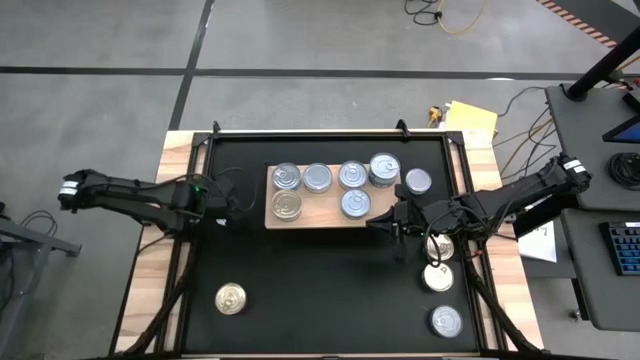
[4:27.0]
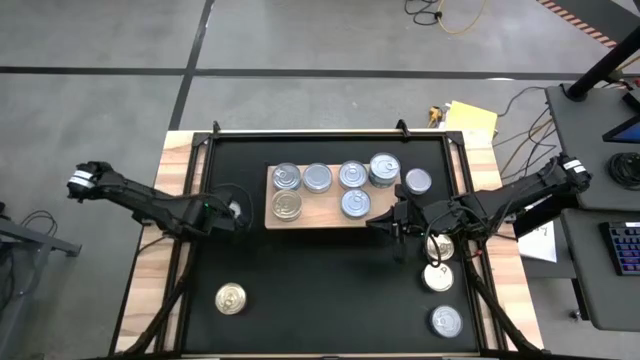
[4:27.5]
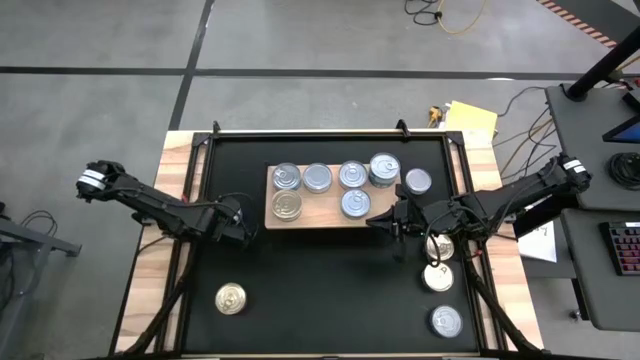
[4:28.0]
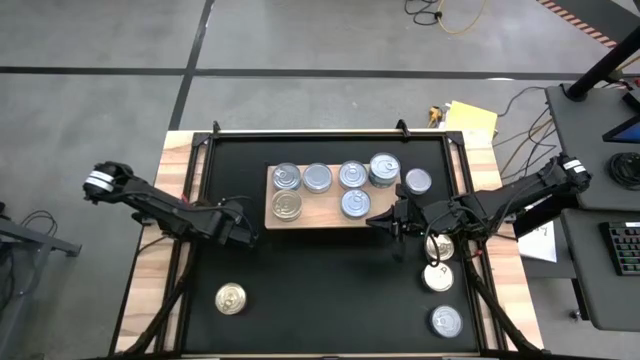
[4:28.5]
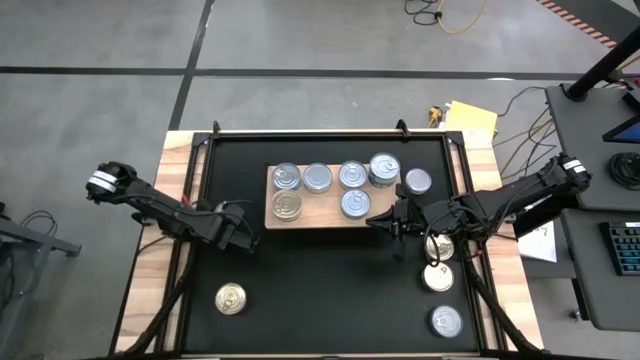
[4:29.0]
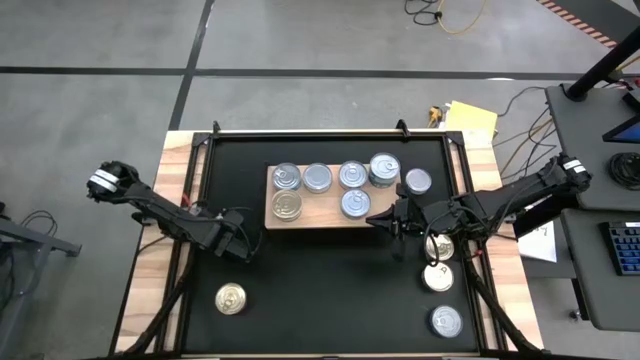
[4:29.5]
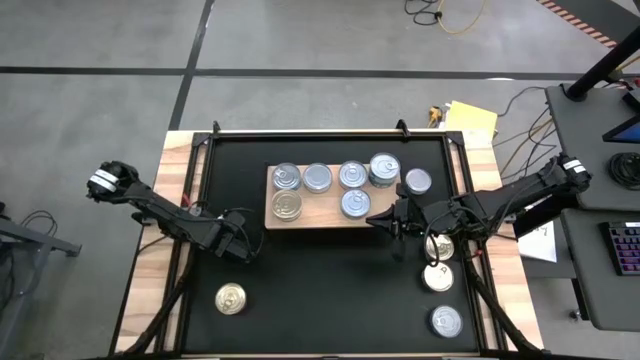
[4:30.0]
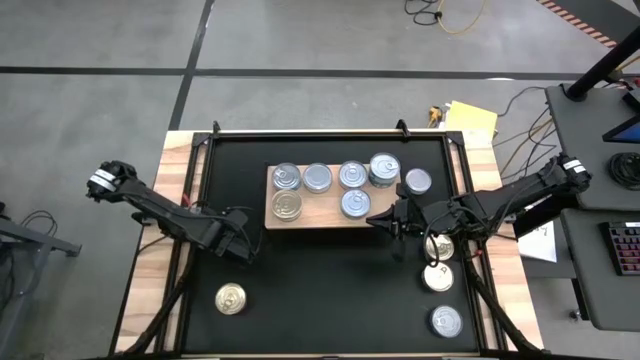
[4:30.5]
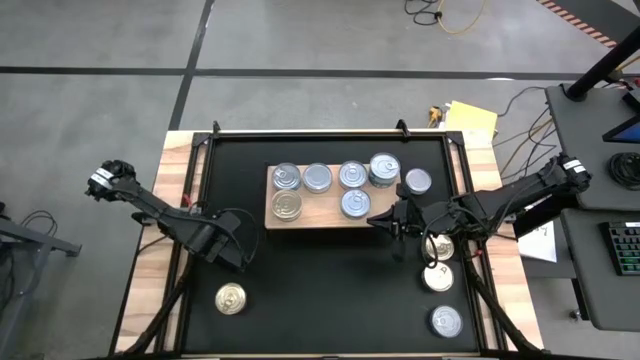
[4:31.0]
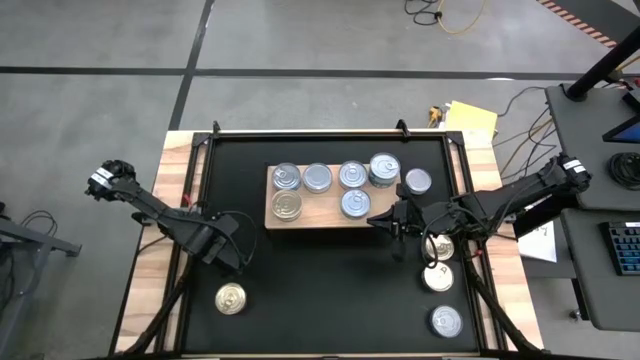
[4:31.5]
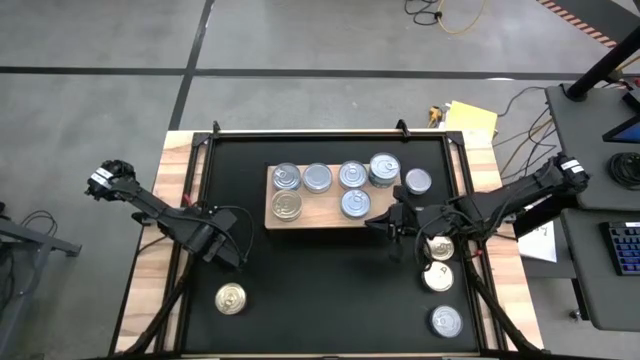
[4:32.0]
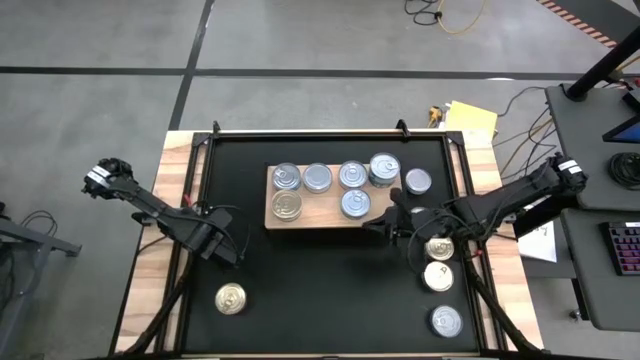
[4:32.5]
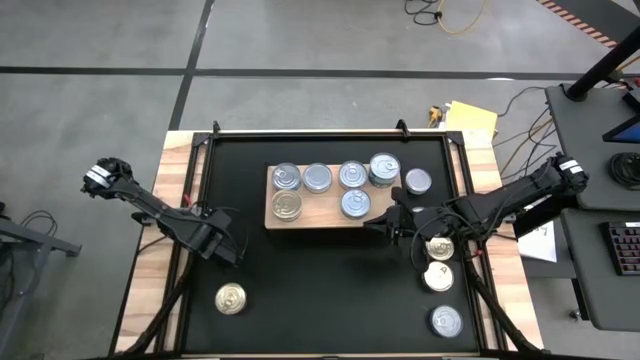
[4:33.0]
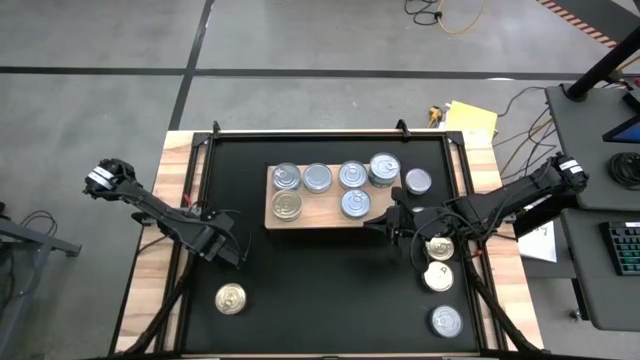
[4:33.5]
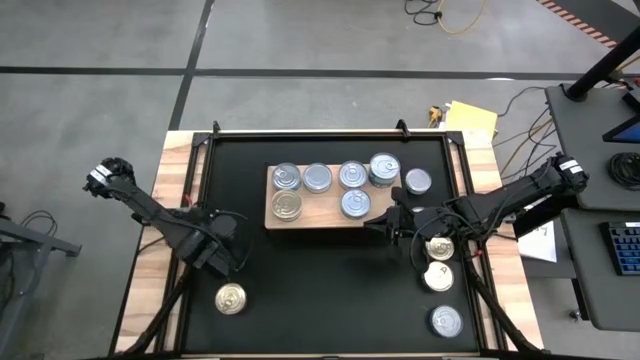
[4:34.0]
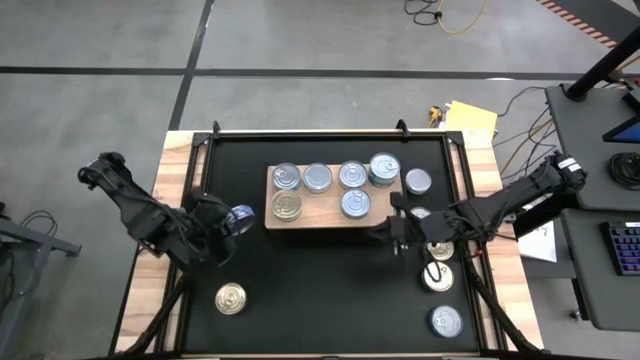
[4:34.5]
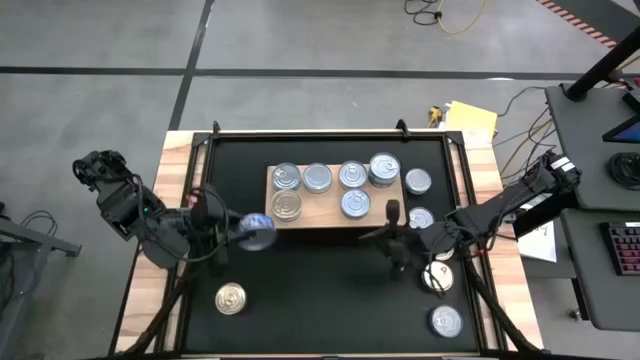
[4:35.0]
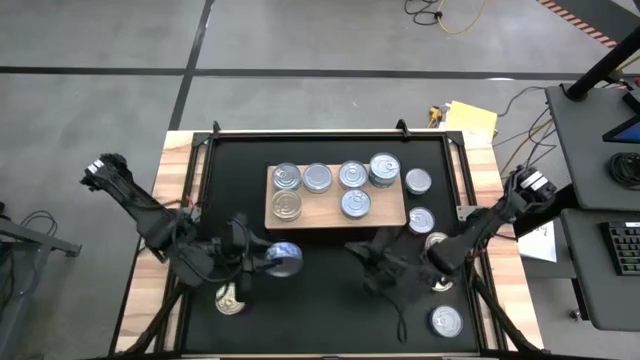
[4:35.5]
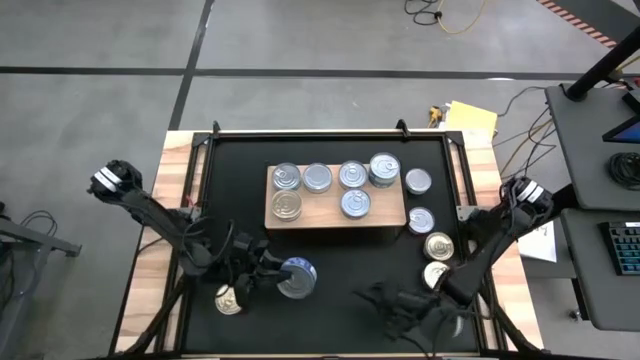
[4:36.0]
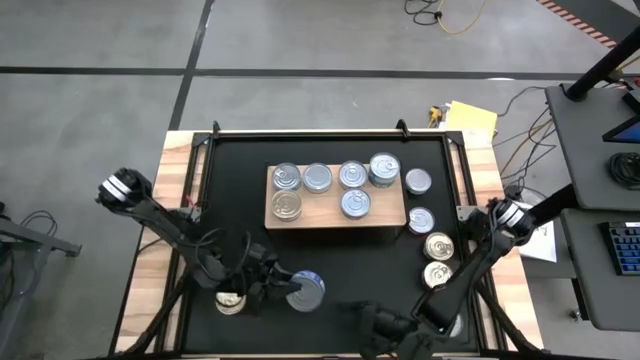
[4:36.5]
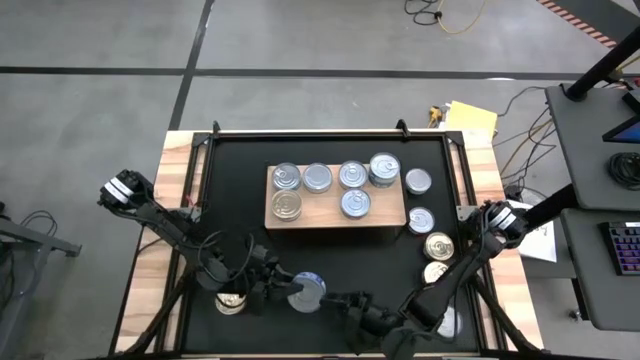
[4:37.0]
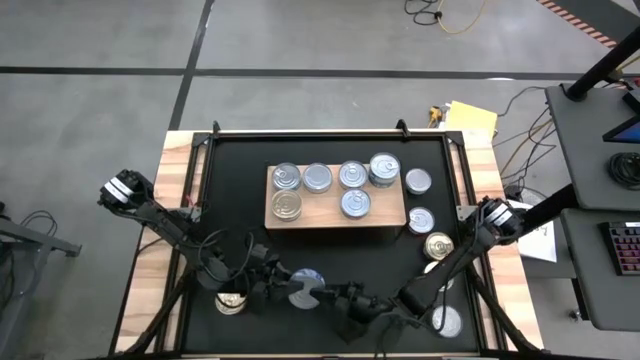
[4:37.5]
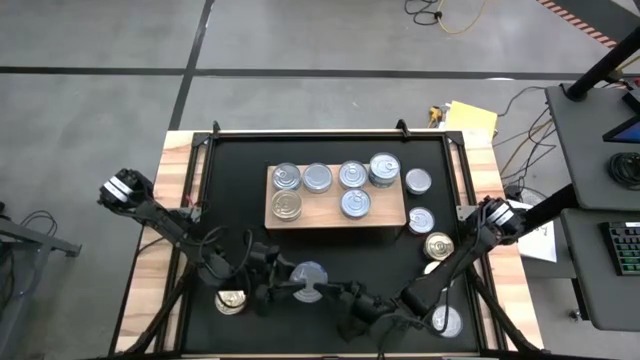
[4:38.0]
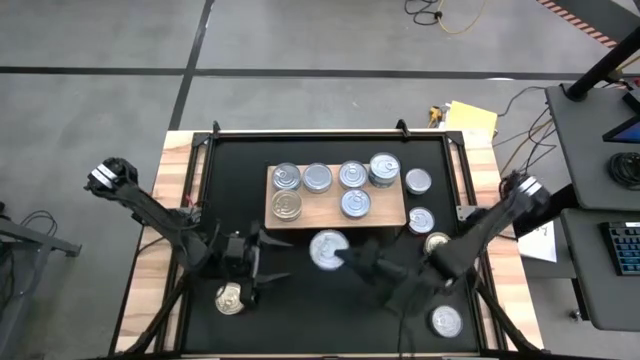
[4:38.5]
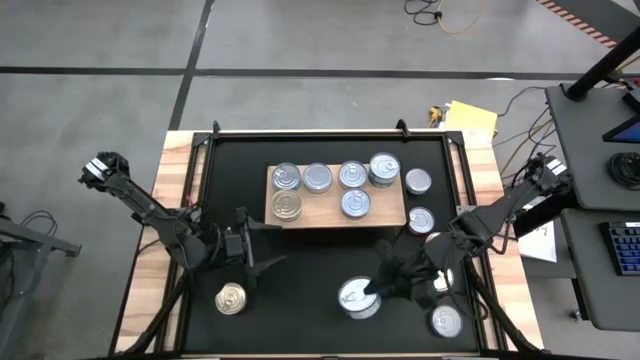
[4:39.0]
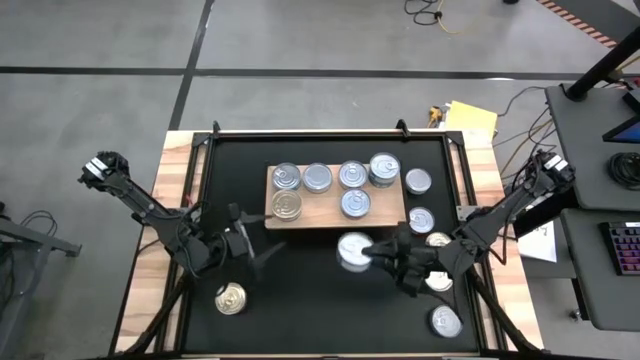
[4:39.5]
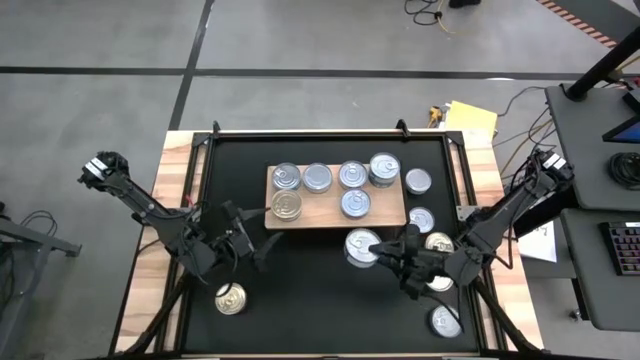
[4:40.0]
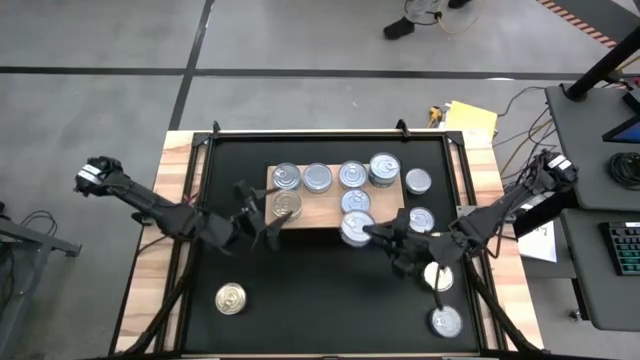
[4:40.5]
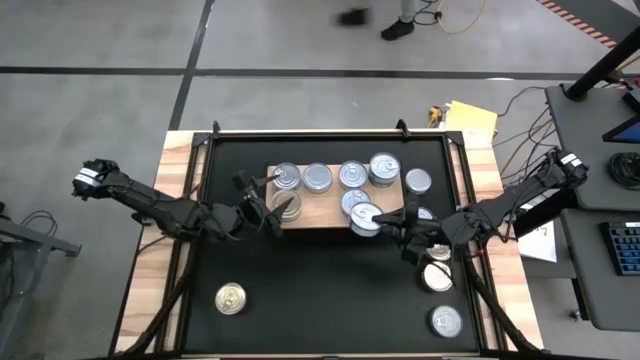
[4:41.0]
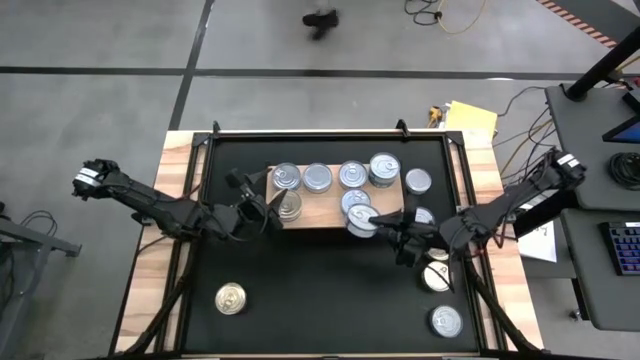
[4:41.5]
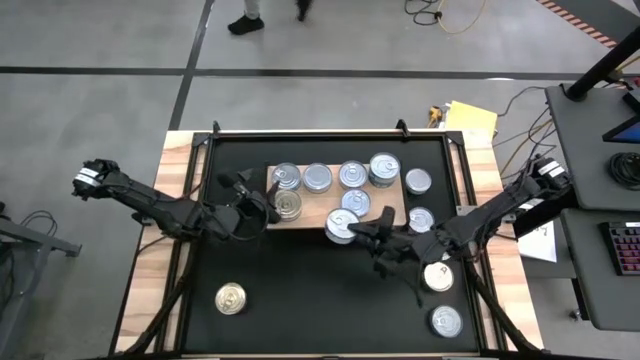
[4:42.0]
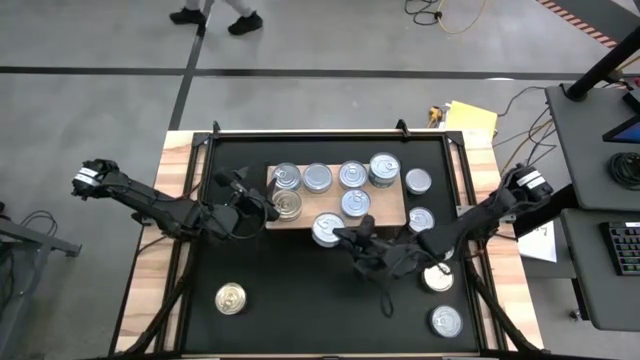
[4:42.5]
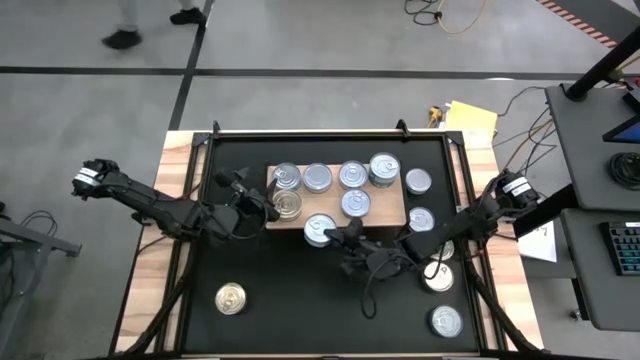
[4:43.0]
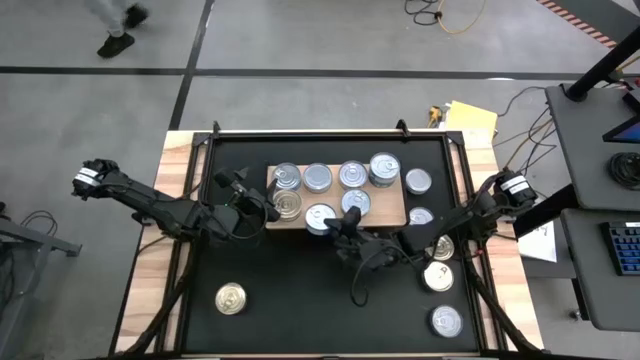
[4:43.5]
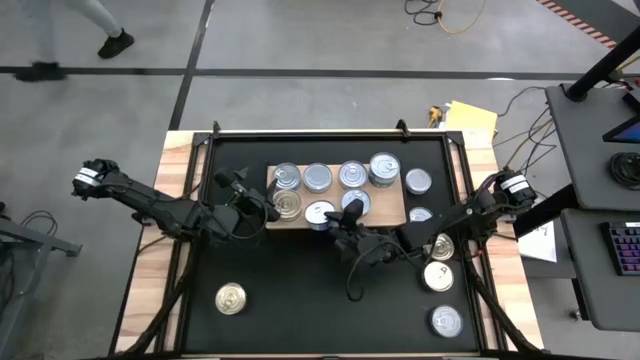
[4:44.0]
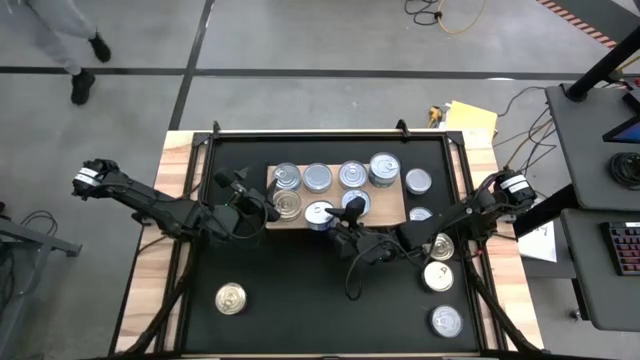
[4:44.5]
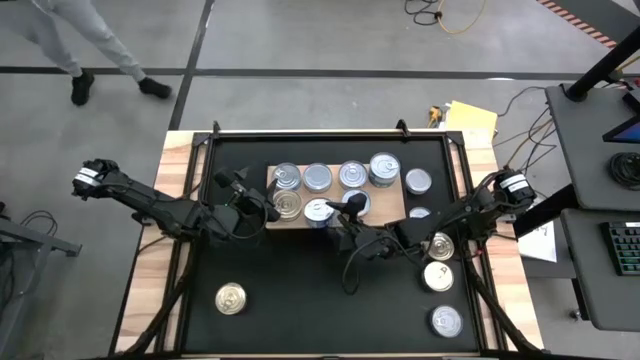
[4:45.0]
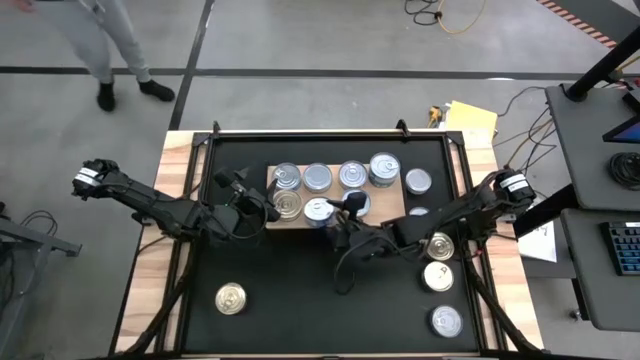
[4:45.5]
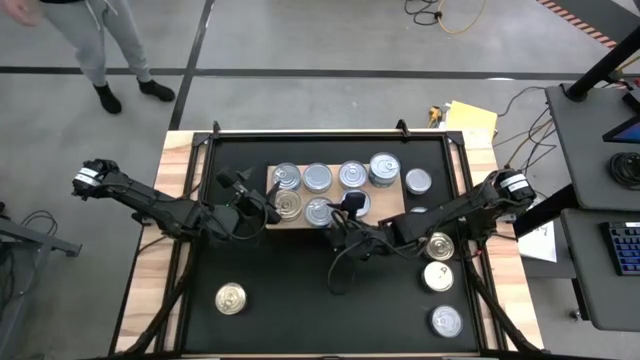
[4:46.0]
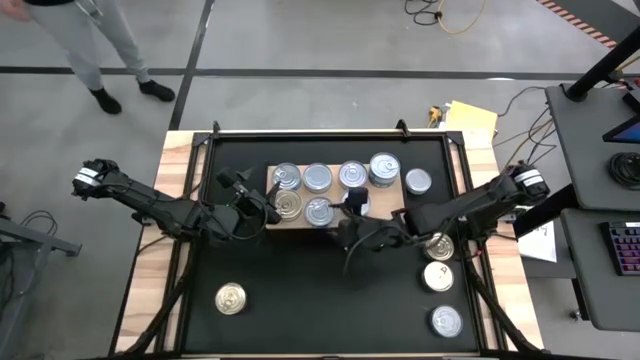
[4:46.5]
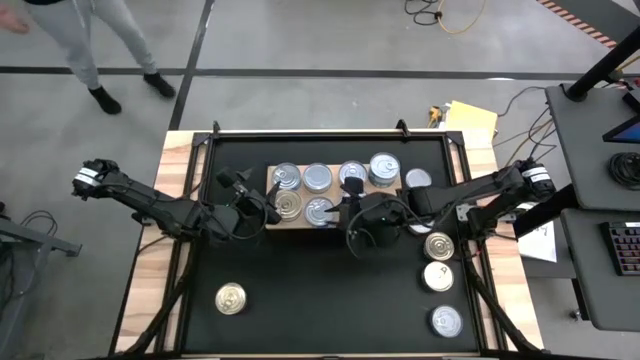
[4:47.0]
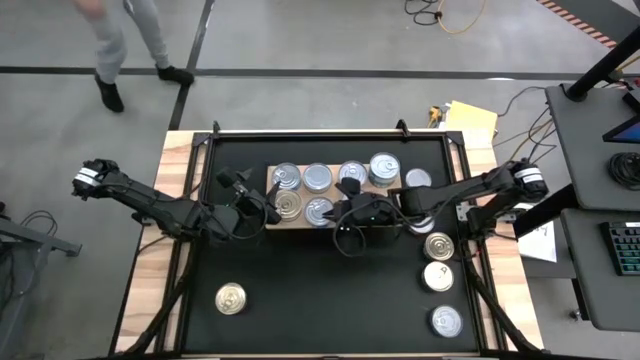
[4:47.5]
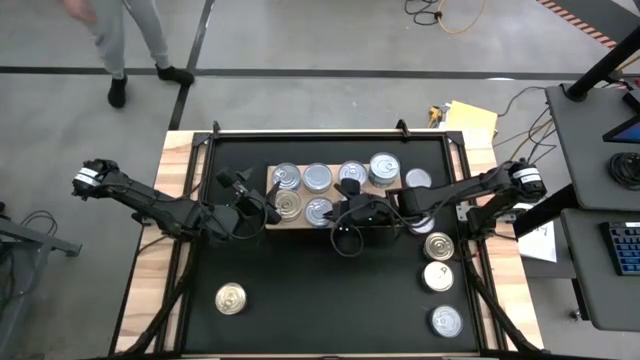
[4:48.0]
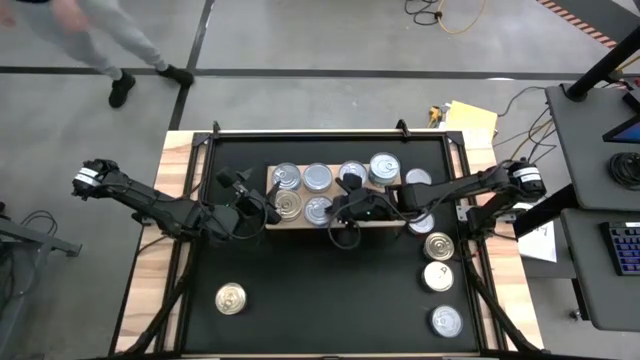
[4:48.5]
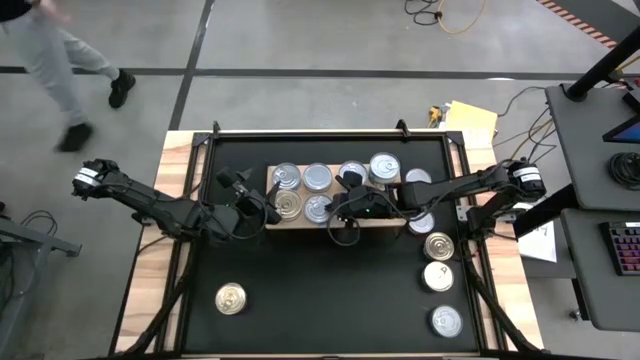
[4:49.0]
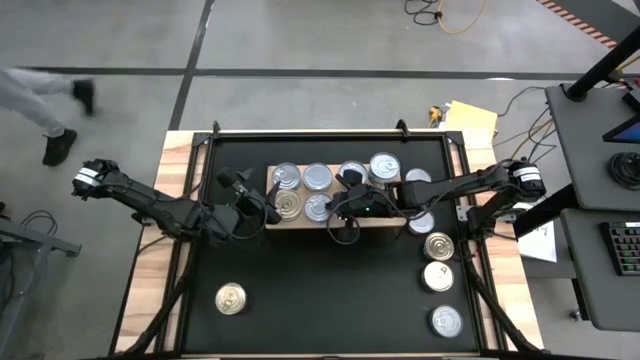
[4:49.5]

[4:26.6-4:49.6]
Task: Stack canned seafood by type on shelf
Put the dark blue tuna can on the shelf
